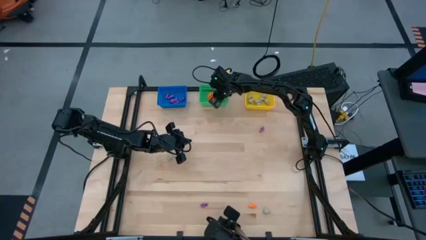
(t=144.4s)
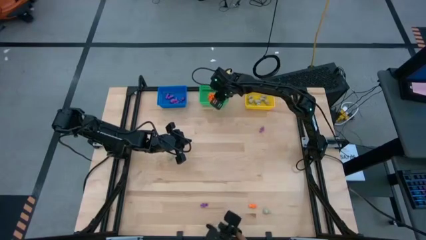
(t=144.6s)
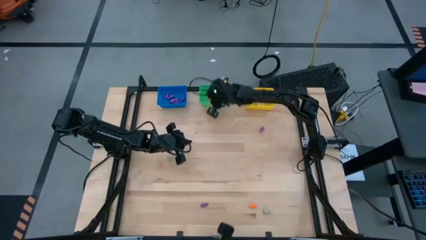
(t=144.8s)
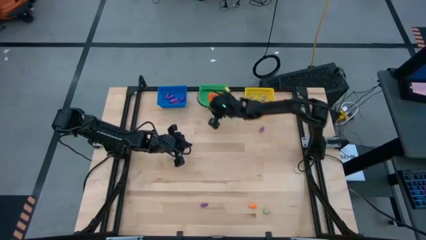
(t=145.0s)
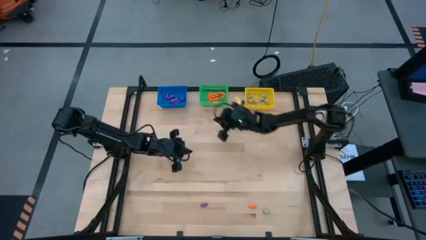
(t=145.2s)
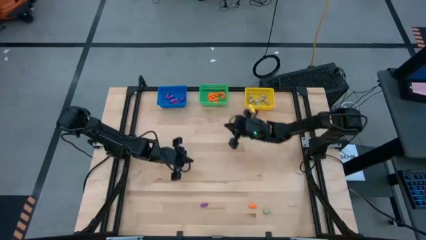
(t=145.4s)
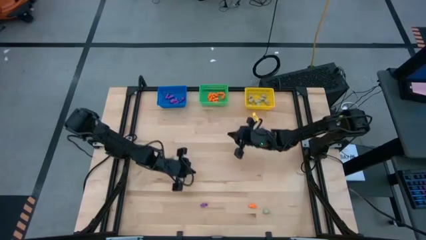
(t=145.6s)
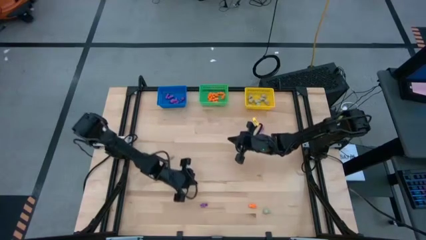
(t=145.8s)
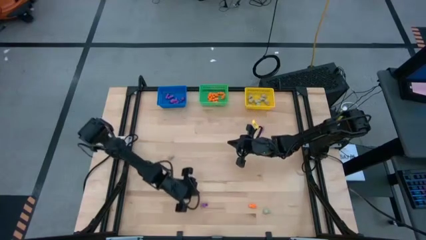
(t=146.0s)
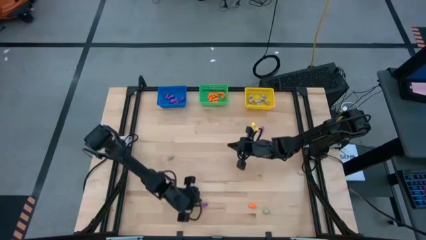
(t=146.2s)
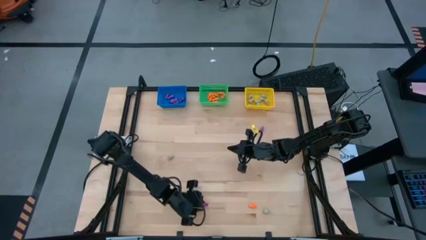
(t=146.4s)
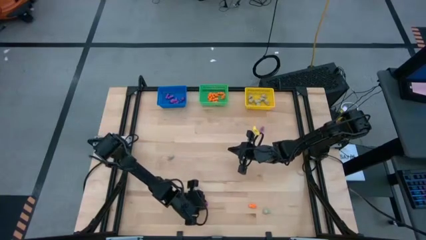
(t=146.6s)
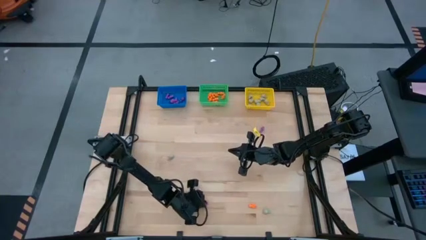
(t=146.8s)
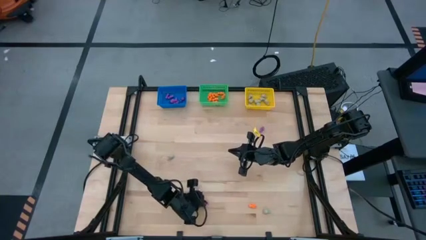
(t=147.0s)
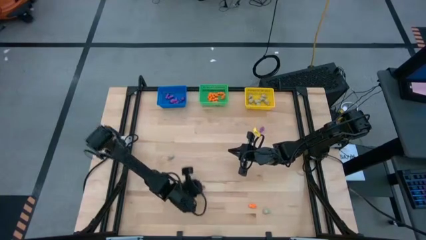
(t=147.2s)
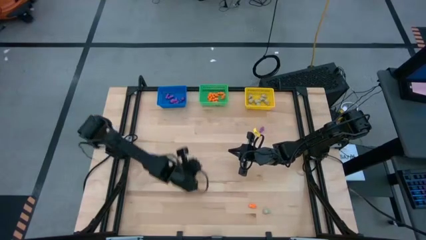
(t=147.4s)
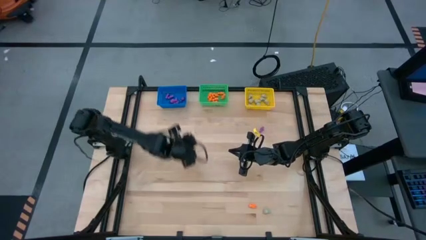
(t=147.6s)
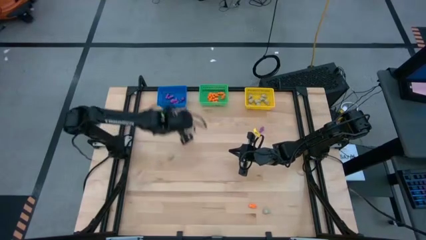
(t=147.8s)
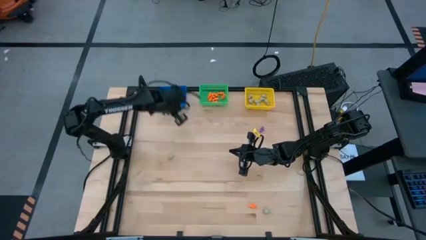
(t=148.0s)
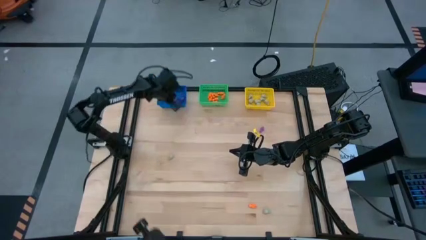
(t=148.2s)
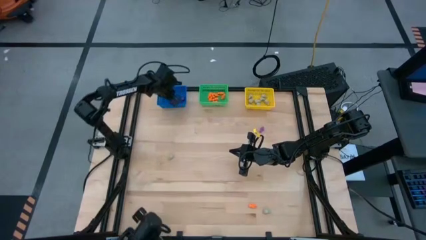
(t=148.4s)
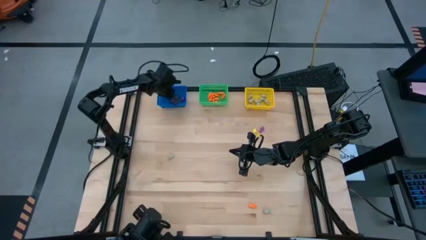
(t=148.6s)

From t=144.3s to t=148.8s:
Task: Sort Halloween decoration
Put the purple skeleton toy into the blue basket

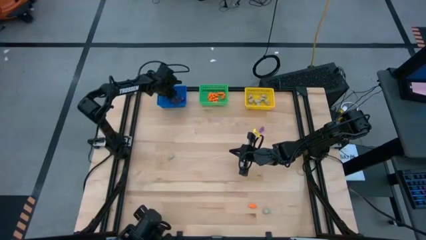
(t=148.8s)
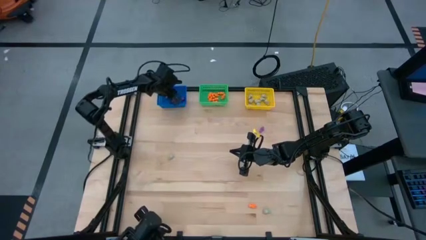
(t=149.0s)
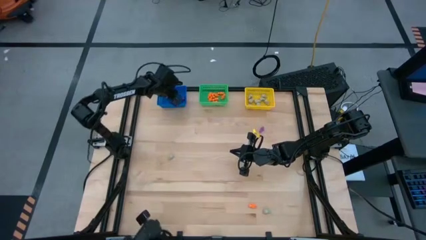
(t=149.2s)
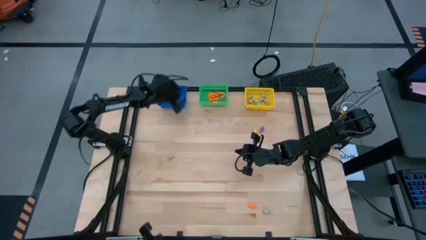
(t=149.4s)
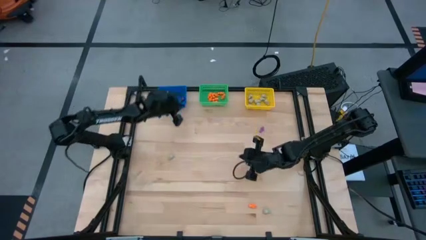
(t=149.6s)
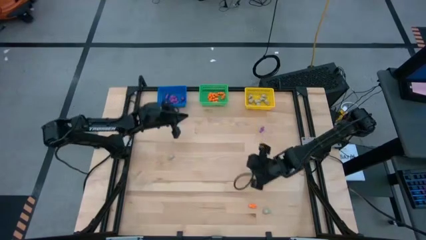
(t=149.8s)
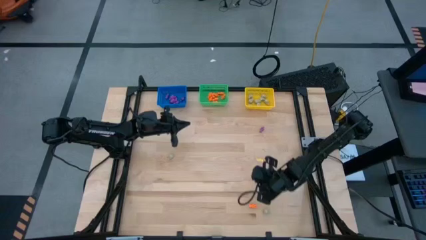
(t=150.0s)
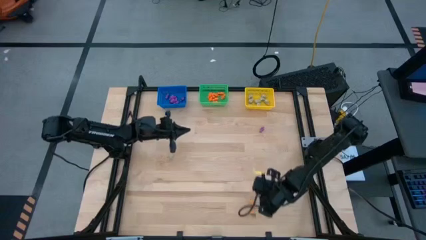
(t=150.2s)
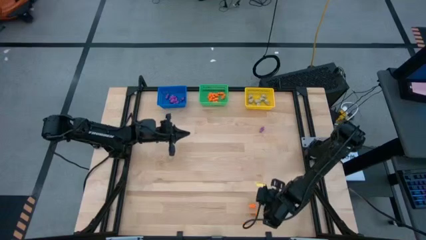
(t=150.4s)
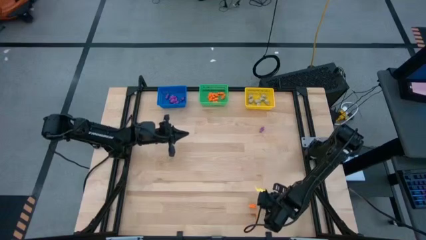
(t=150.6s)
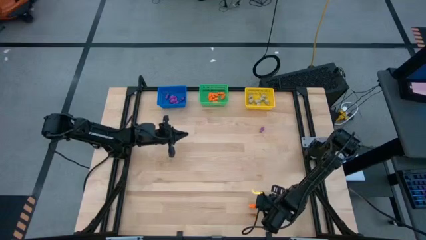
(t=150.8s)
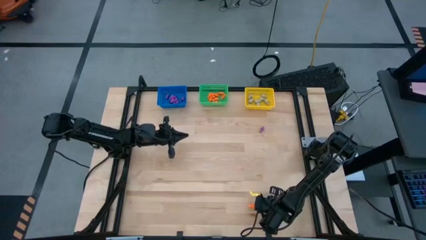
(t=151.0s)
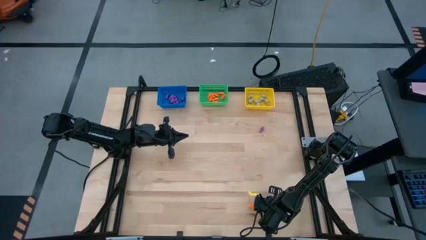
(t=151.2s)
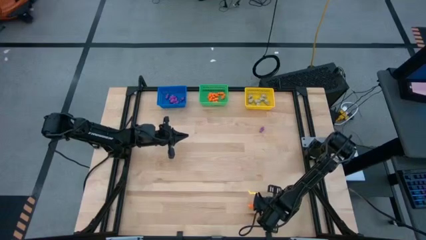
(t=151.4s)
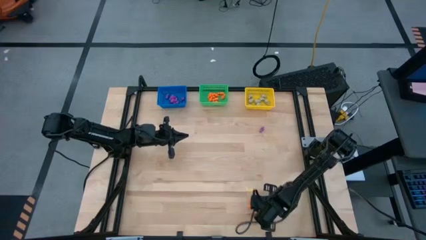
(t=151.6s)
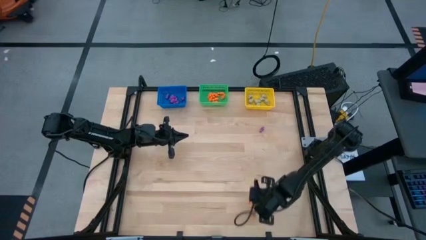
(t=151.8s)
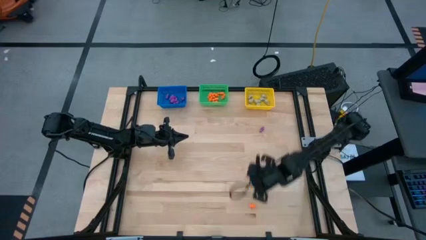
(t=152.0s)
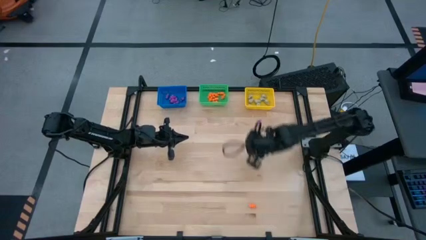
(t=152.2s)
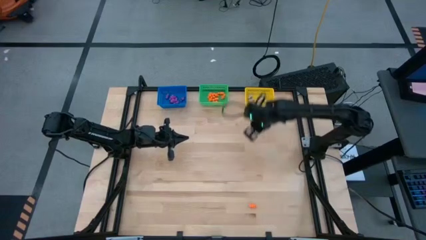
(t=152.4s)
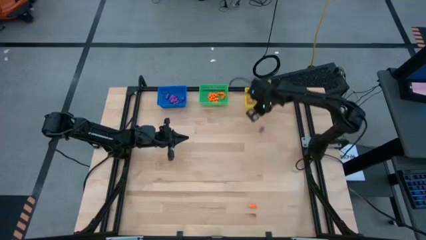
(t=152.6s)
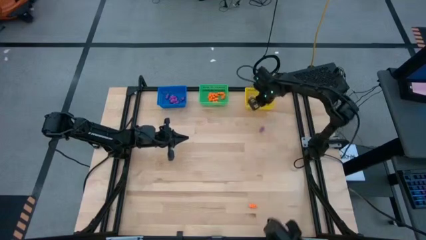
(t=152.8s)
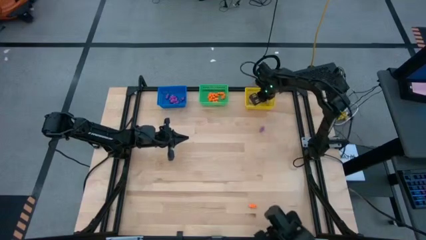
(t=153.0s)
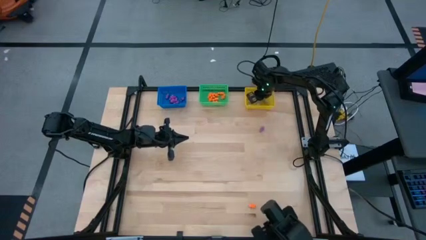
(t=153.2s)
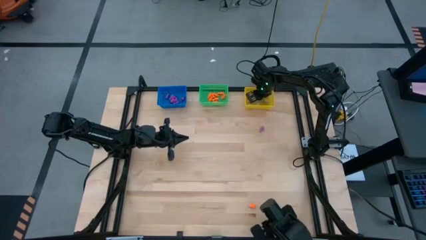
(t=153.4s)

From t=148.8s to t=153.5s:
Put the grey skull toy into the yellow basket

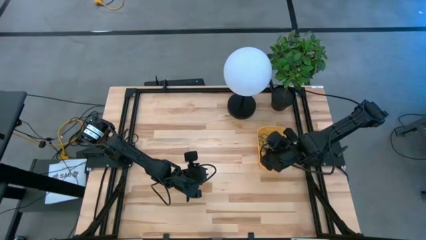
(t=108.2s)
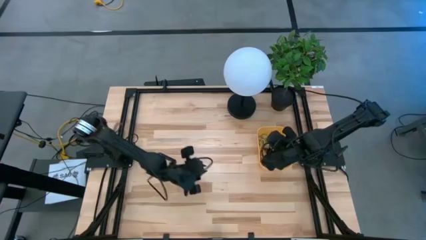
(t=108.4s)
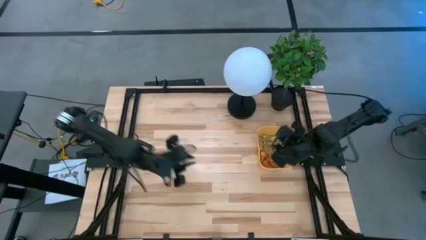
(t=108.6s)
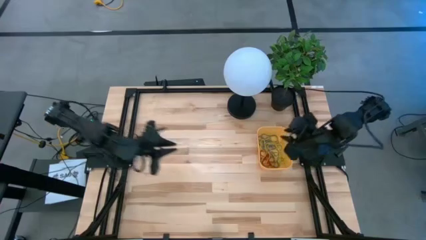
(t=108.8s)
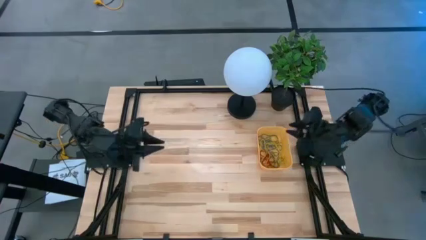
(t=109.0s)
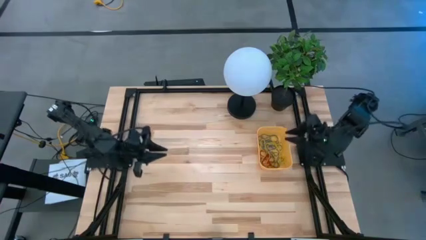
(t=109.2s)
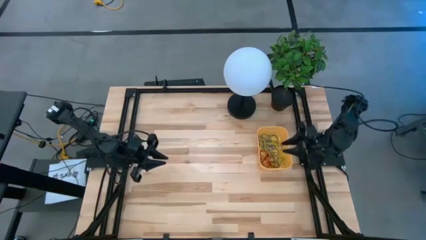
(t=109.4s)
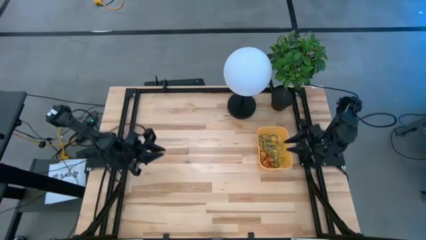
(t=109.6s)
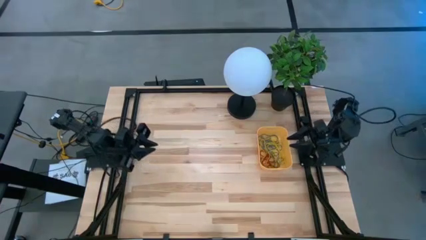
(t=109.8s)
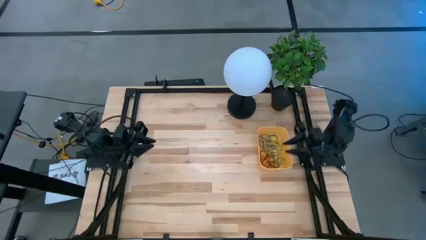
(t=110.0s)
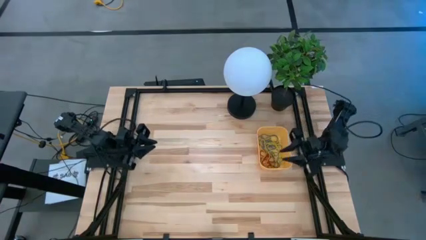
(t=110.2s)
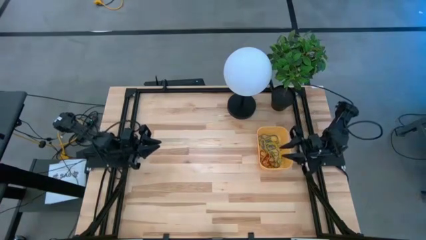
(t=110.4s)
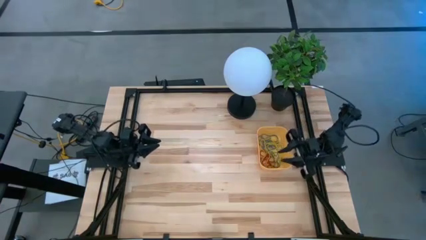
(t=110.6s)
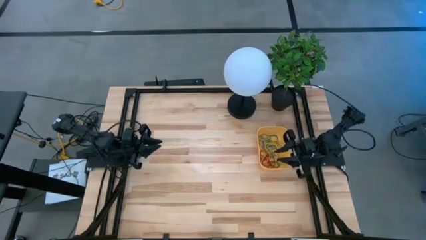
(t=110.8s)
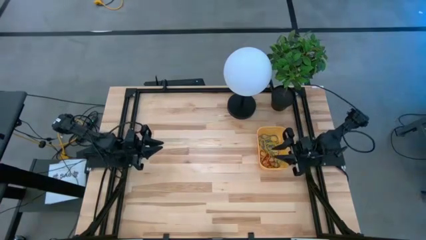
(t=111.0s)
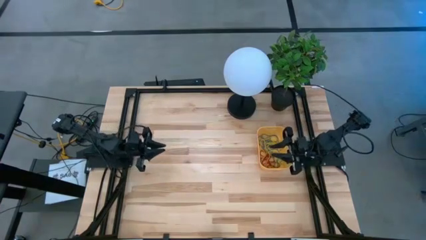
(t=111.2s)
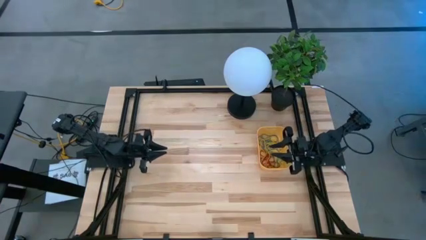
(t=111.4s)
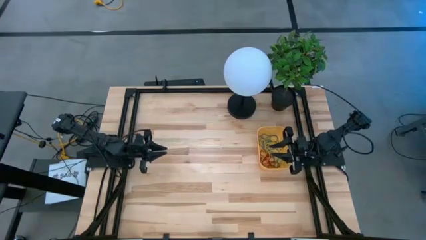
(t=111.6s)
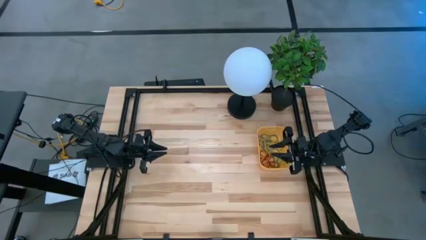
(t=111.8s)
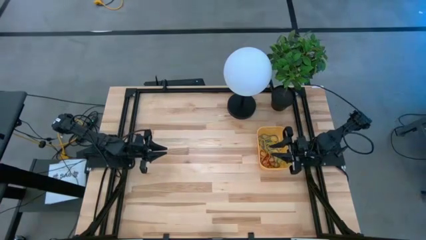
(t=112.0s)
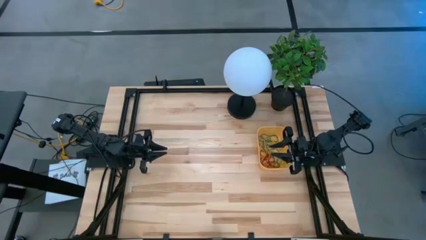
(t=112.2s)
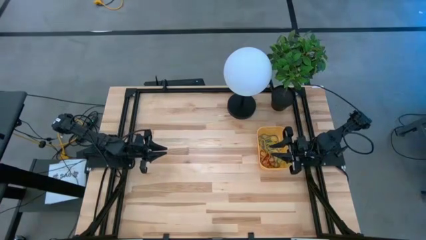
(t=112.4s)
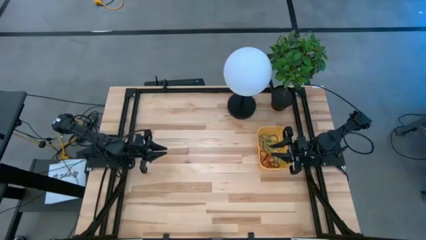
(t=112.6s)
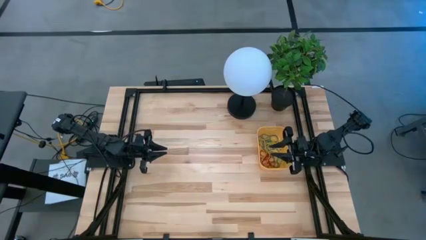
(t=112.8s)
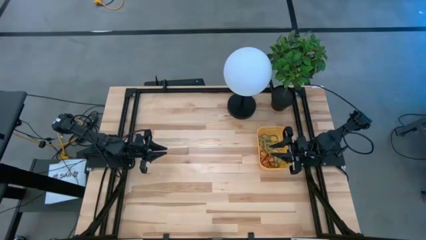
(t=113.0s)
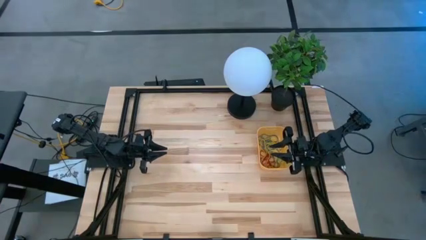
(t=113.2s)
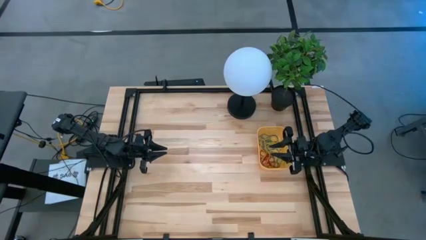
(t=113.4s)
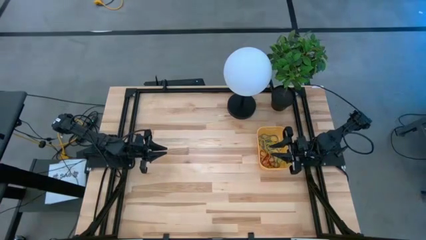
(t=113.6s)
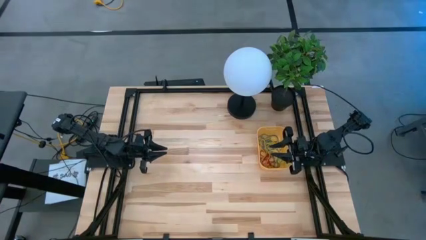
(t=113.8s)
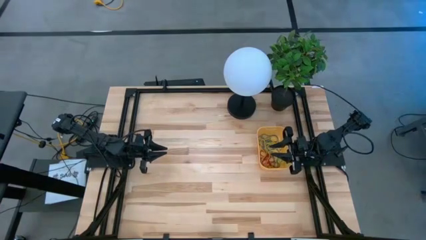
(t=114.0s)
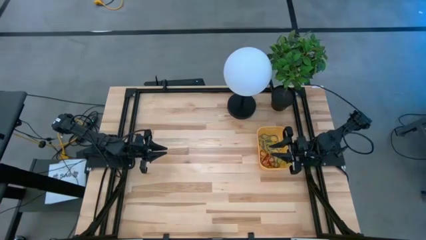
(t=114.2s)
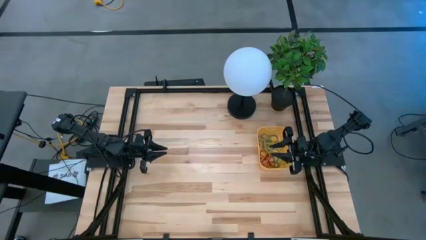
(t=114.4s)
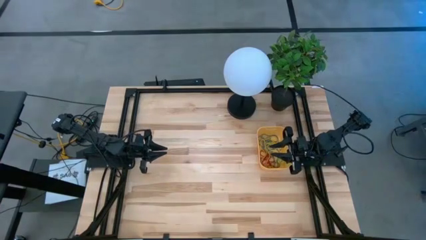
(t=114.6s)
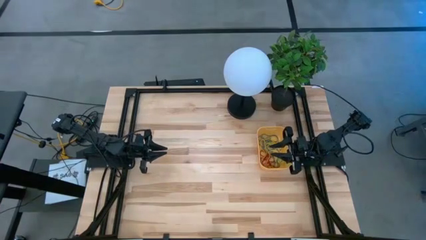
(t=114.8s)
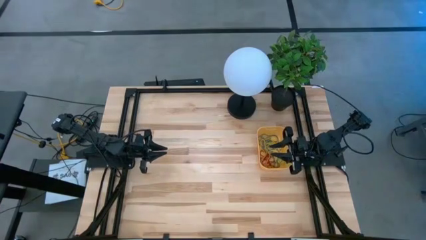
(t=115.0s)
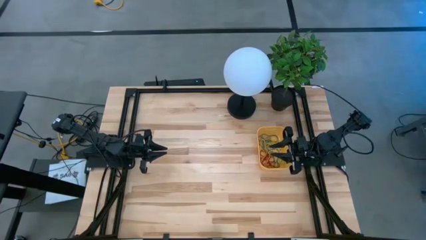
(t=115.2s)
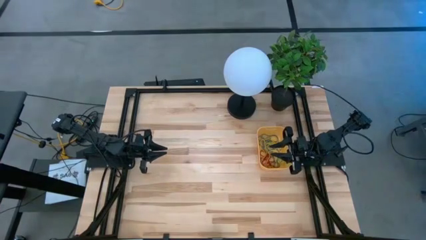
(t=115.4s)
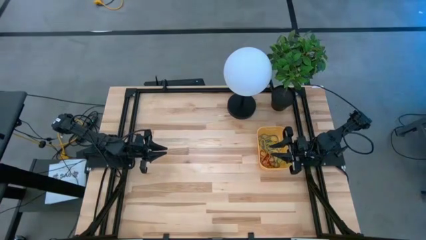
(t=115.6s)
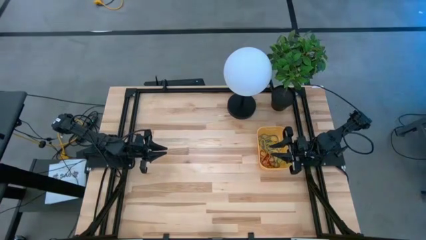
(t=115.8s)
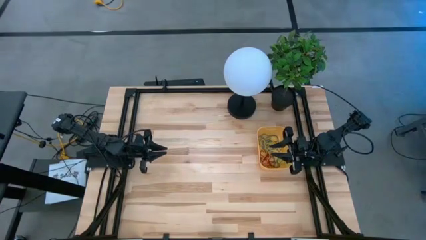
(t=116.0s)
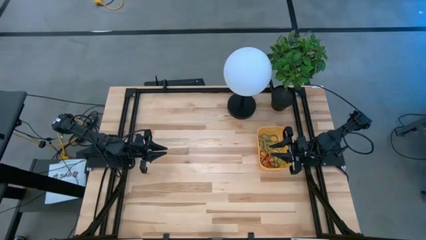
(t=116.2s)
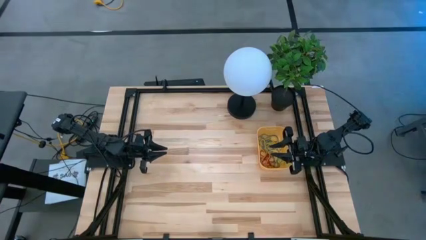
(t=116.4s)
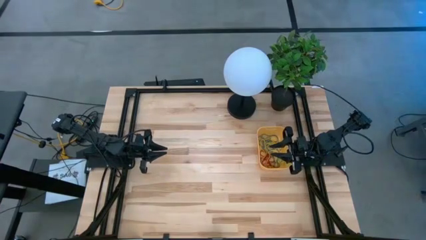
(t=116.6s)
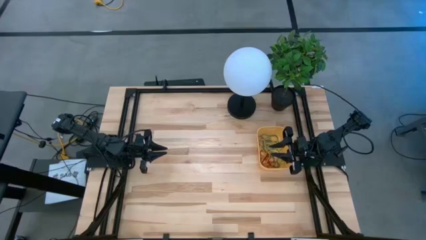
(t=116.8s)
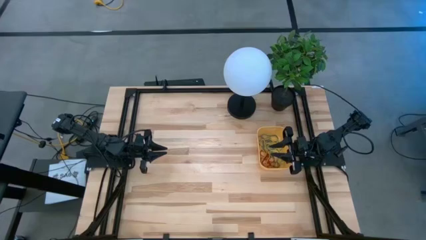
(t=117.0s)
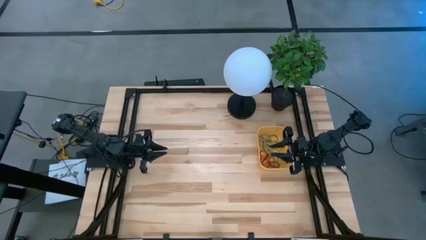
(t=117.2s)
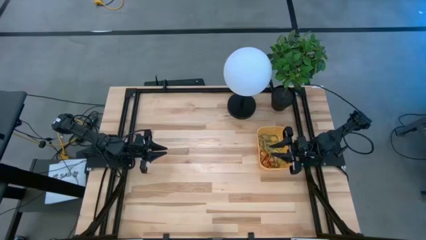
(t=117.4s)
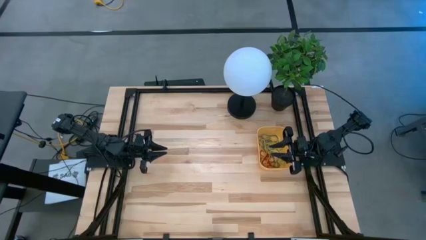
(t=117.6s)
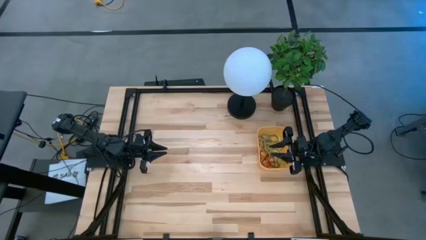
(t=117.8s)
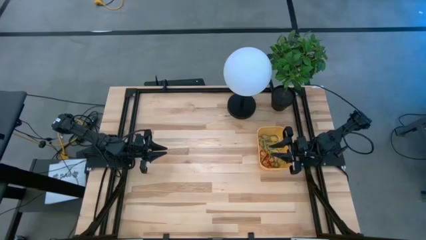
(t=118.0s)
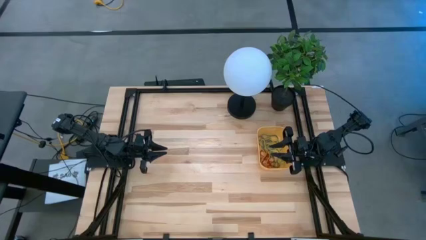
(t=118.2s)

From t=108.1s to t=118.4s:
Task: Pick and place items into bin
Return to Home Position
